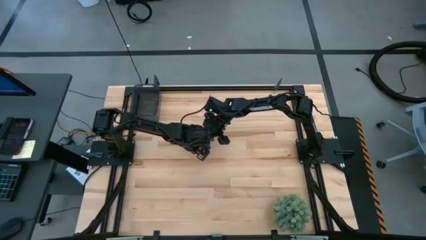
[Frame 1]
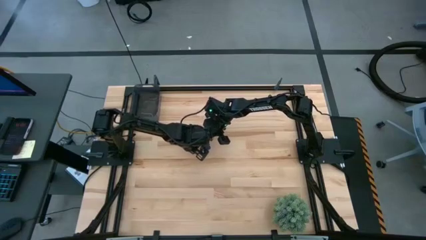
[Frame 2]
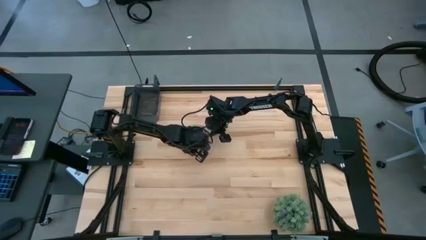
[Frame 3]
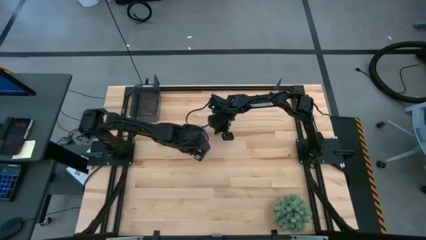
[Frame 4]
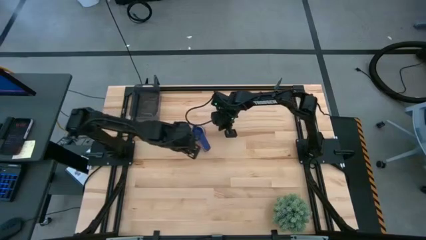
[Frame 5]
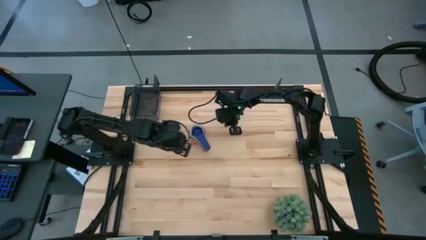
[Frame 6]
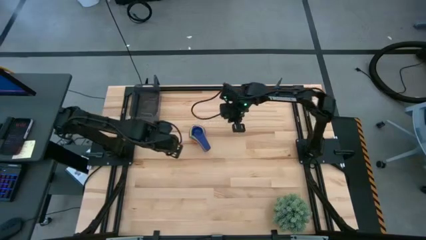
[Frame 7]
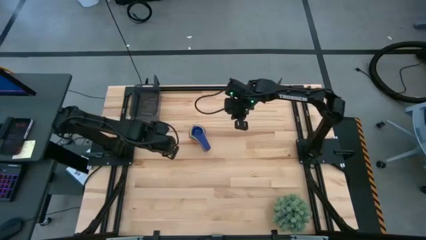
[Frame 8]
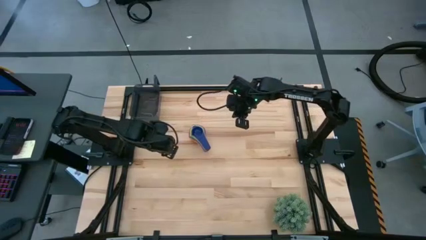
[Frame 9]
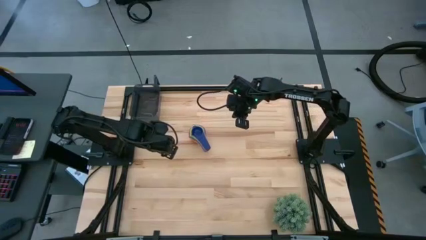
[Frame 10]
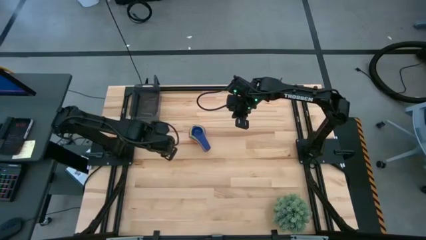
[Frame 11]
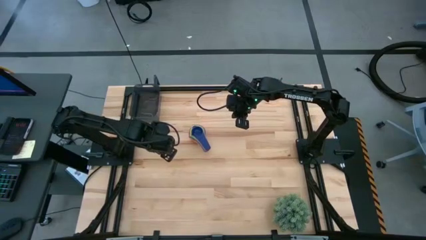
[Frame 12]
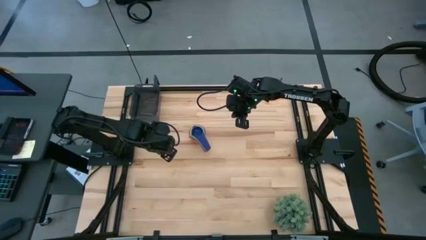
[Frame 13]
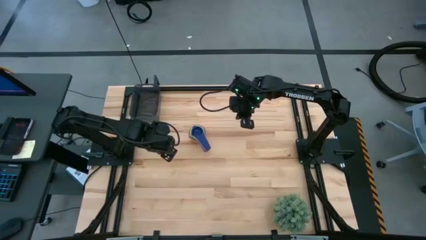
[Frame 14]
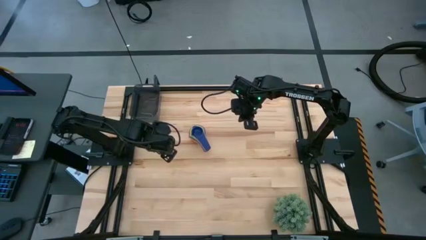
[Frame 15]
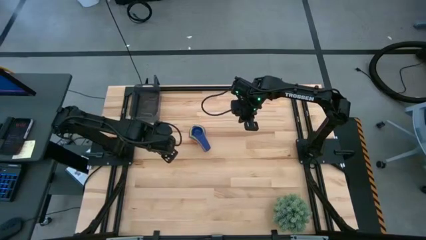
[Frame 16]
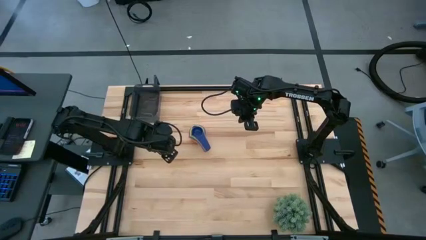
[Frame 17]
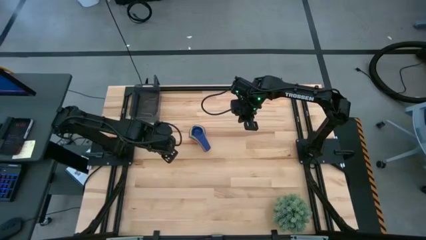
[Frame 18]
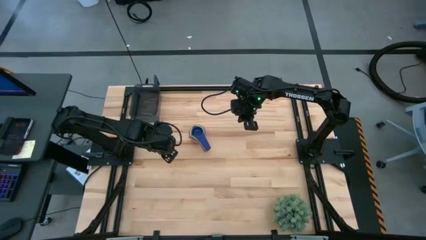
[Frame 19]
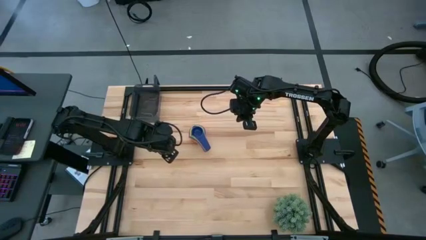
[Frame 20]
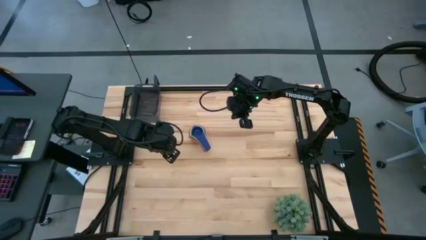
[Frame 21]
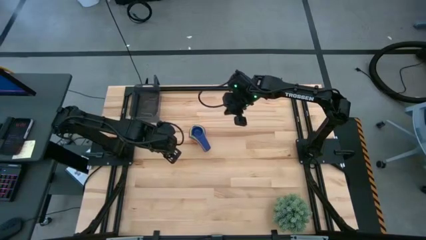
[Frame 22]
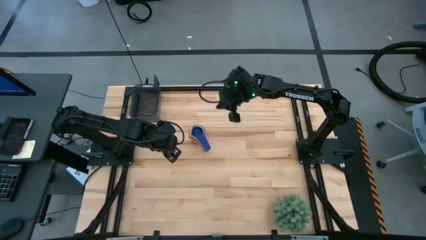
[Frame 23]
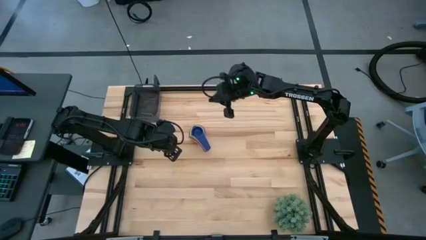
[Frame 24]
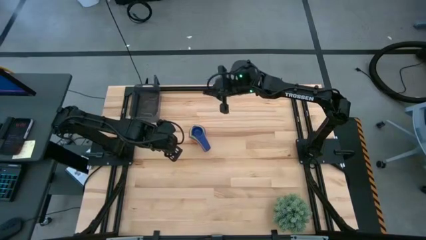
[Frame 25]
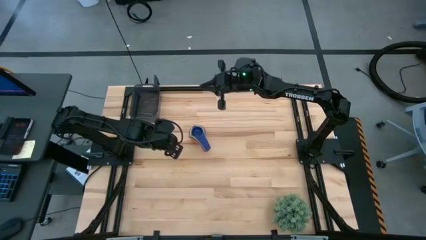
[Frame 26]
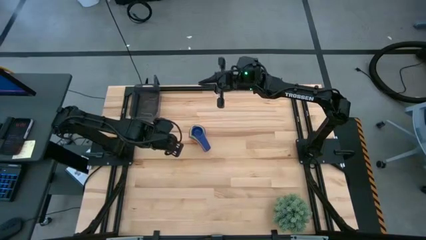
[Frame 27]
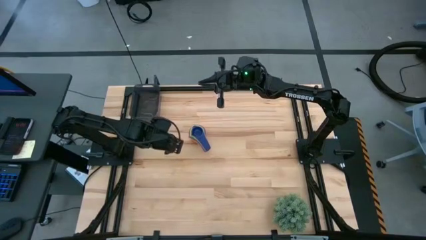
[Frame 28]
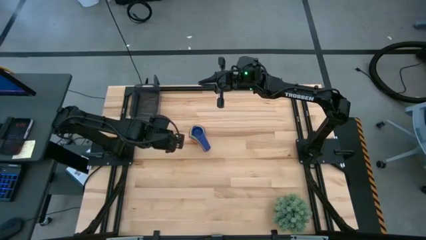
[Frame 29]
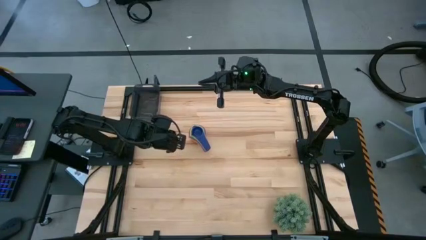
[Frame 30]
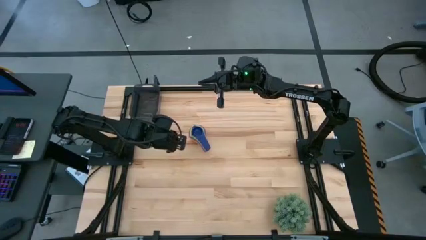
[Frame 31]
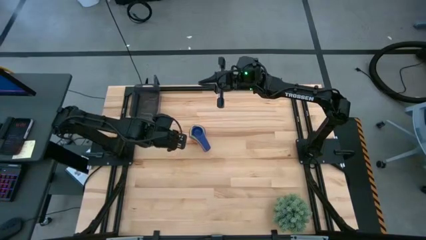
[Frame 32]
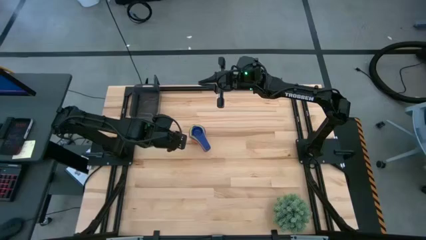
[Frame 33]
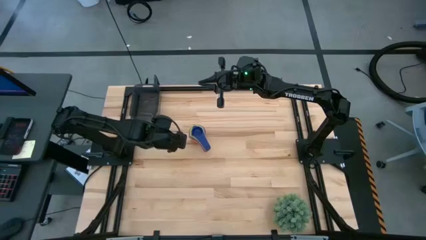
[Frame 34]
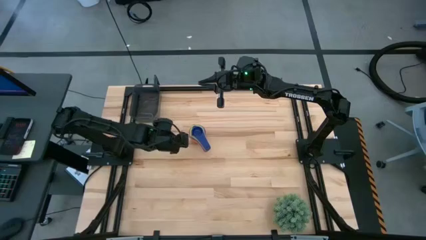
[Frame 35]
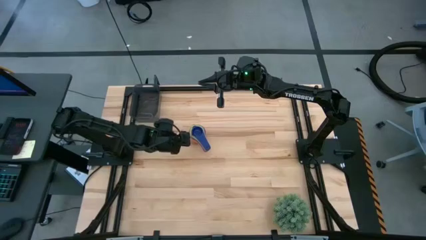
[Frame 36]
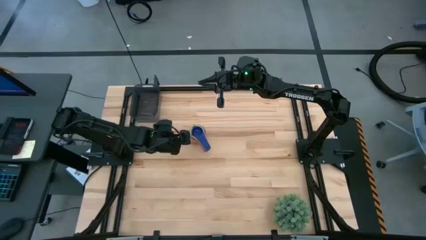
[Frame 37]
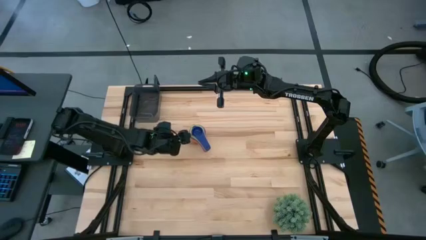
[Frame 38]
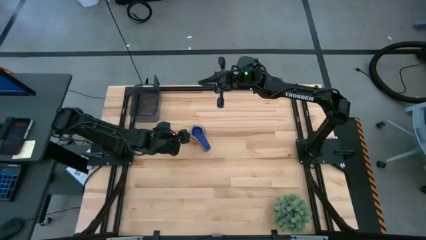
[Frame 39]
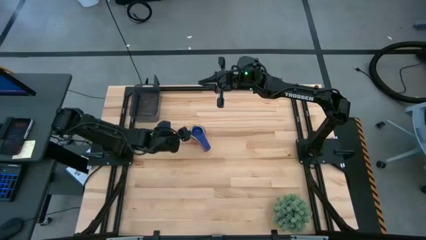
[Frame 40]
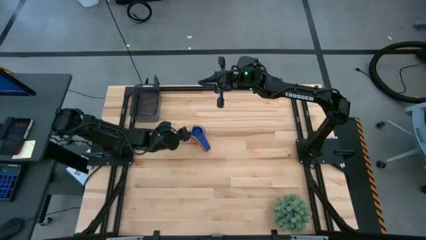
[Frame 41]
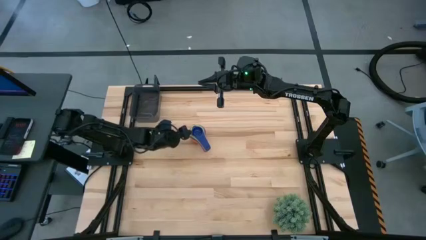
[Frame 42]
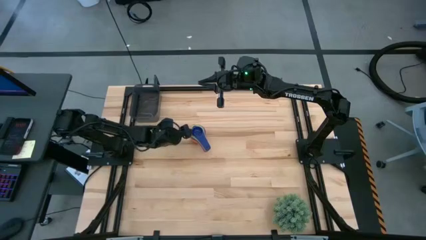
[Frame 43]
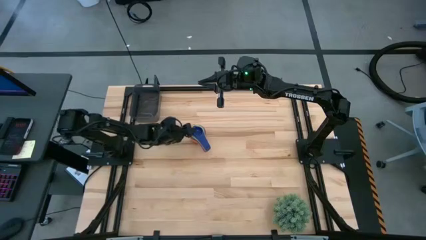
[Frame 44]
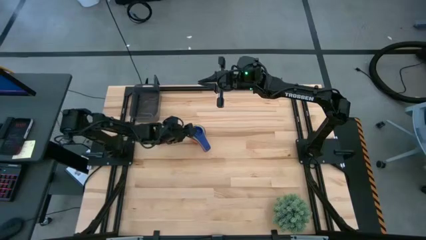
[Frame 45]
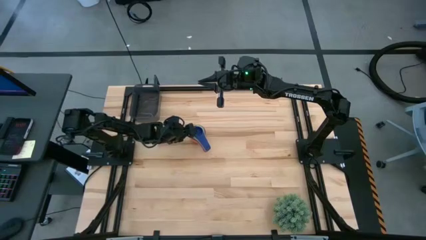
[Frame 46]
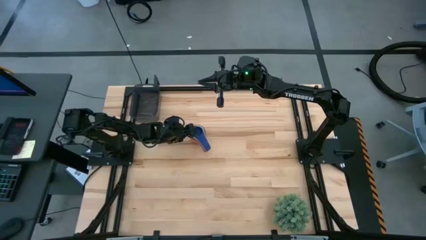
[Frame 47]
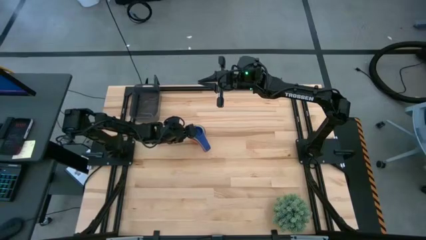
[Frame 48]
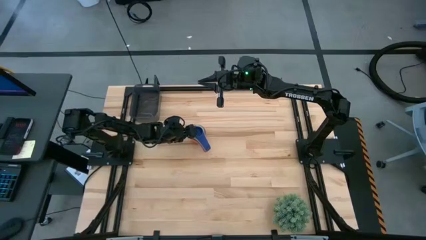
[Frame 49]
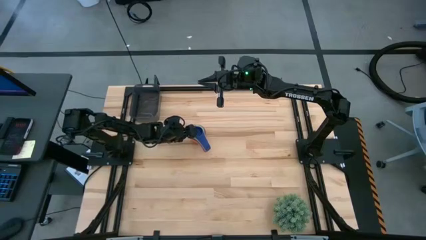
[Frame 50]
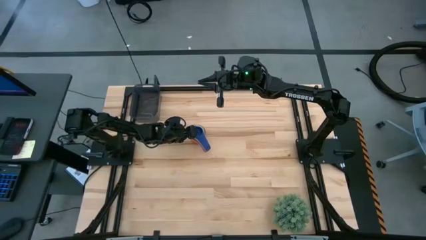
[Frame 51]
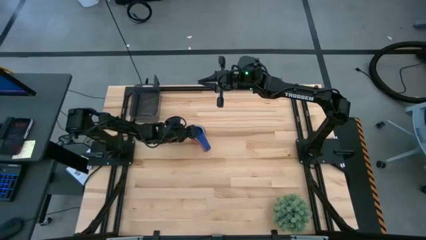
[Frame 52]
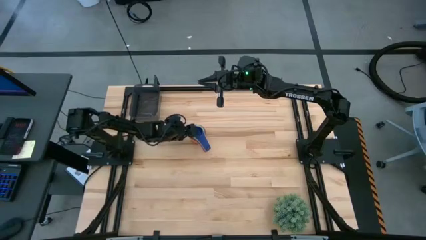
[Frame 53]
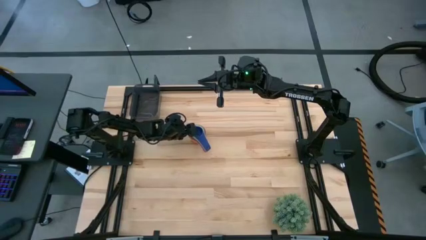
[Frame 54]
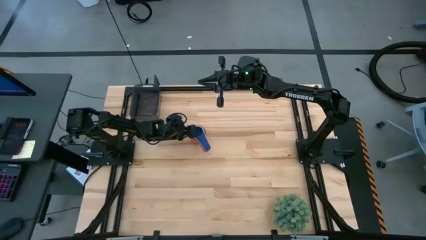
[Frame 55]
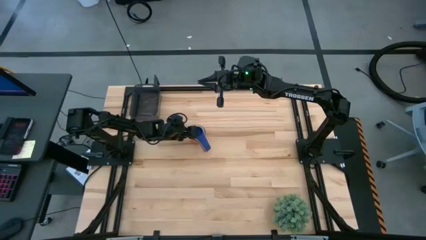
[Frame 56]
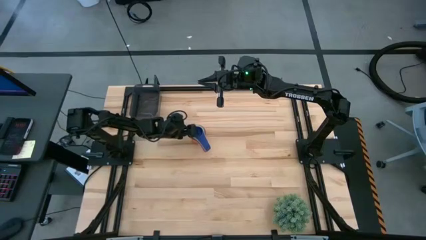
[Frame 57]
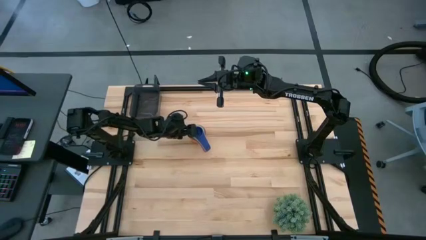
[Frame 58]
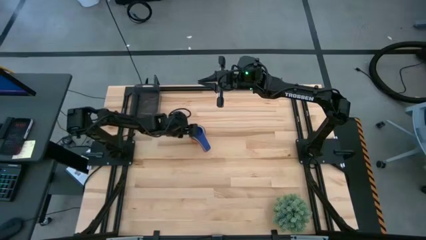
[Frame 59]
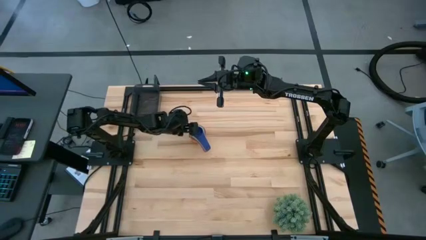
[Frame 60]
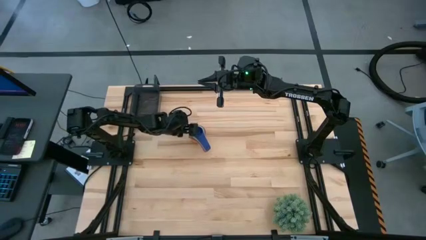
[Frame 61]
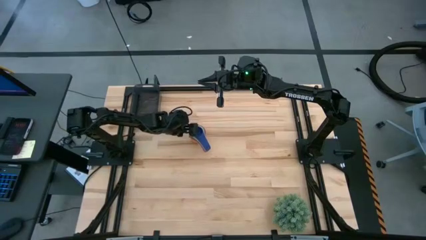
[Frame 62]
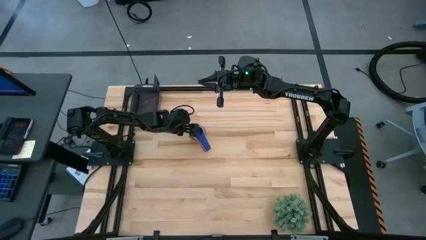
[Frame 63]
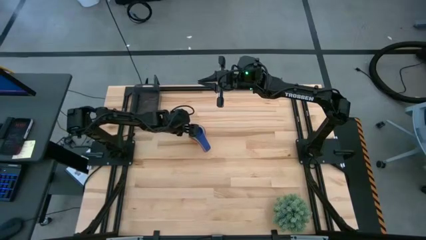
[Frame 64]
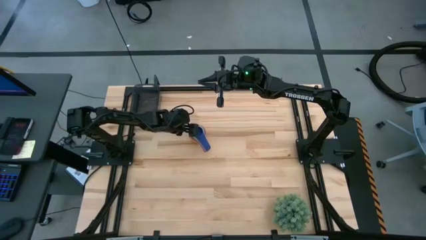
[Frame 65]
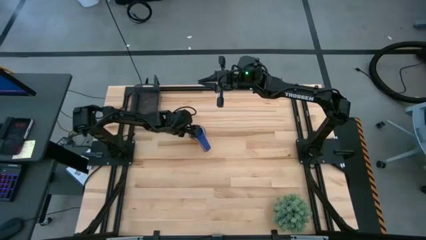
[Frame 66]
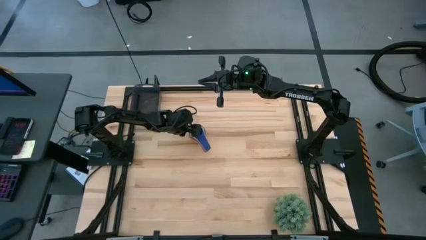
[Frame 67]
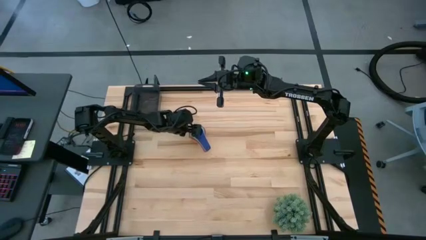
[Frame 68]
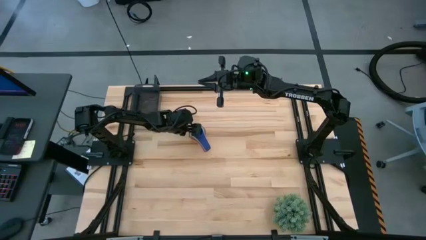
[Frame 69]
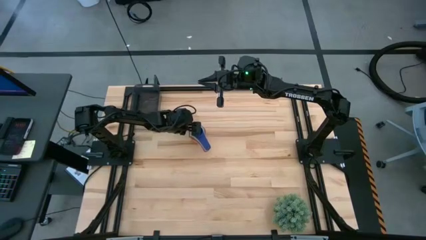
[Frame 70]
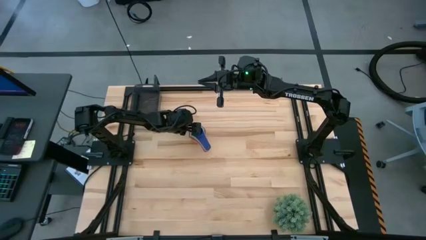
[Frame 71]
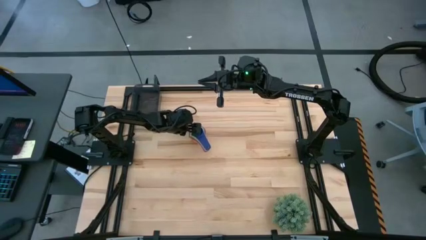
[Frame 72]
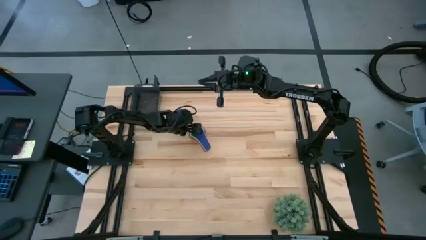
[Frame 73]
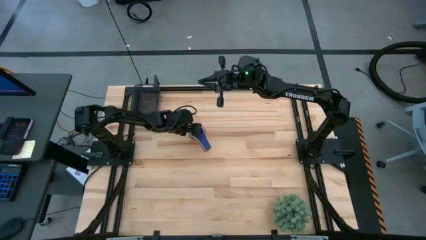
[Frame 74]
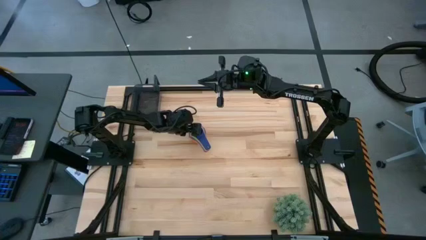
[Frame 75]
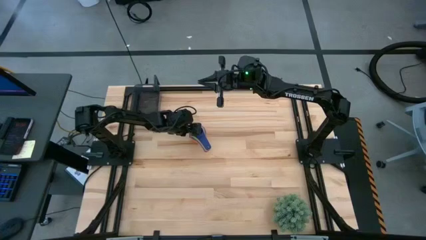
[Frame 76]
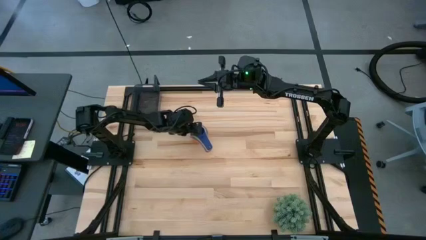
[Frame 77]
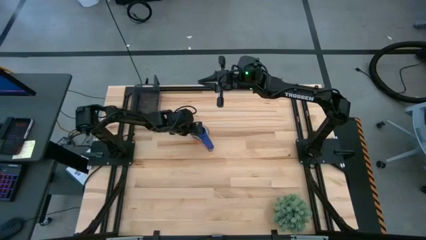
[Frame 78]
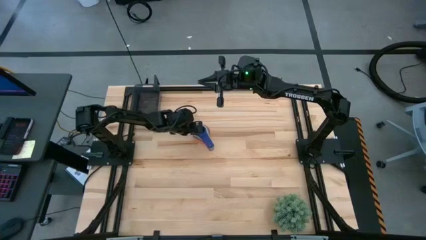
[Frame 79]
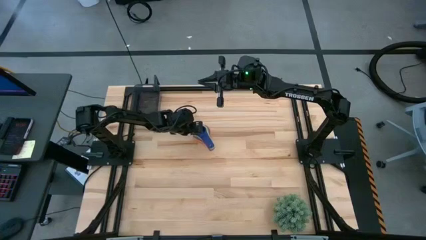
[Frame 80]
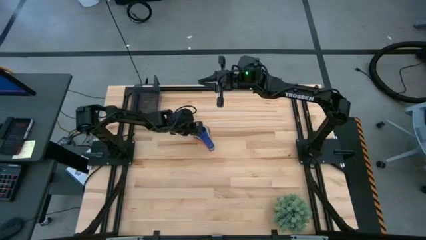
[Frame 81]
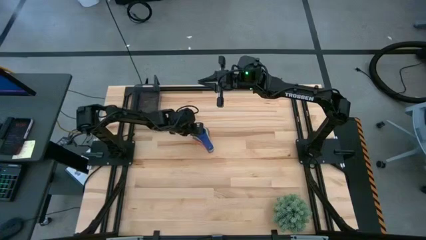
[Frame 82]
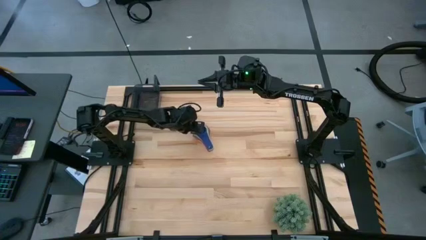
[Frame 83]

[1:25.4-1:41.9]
Task: Nest measuring cups in basket
Put the stack of measuring cups into the black bin
